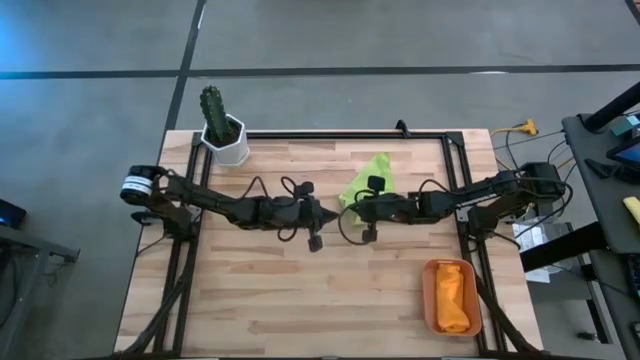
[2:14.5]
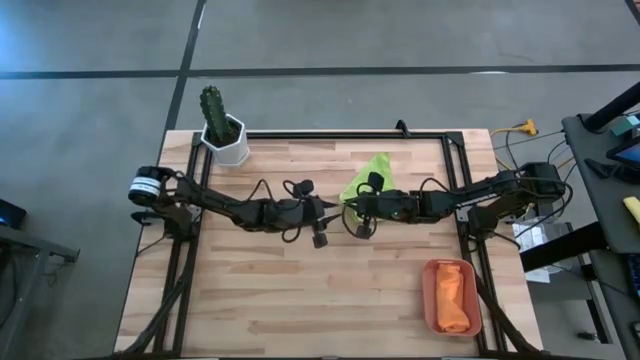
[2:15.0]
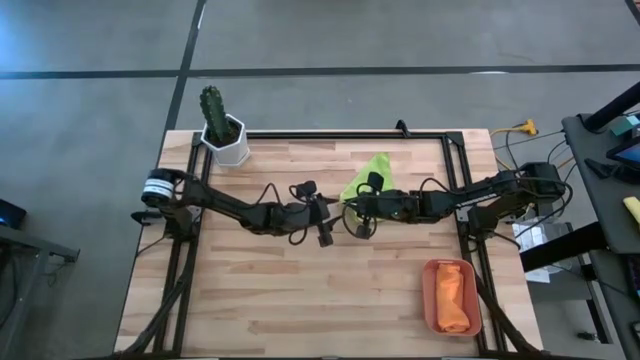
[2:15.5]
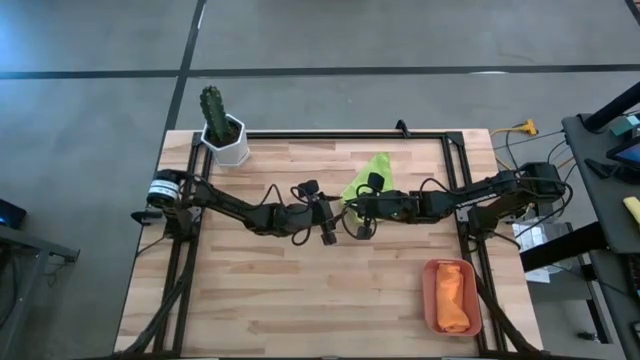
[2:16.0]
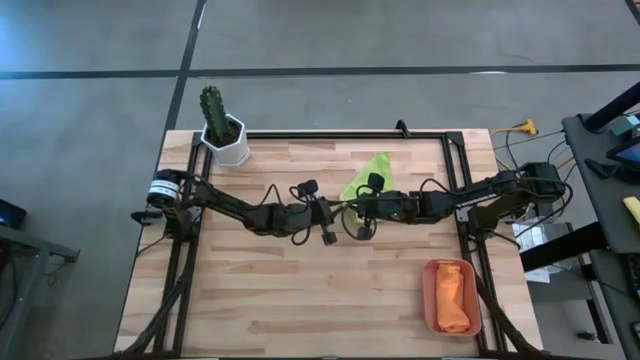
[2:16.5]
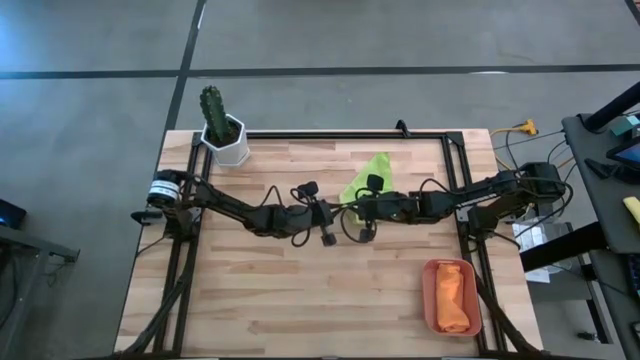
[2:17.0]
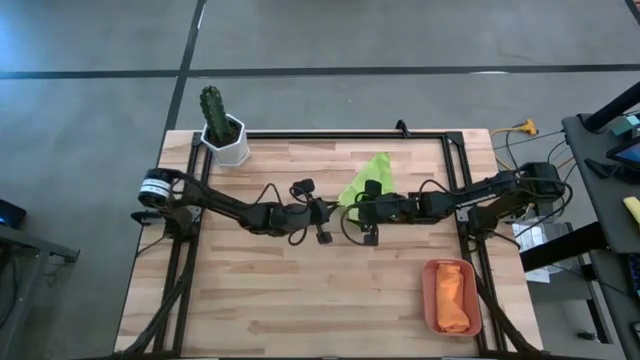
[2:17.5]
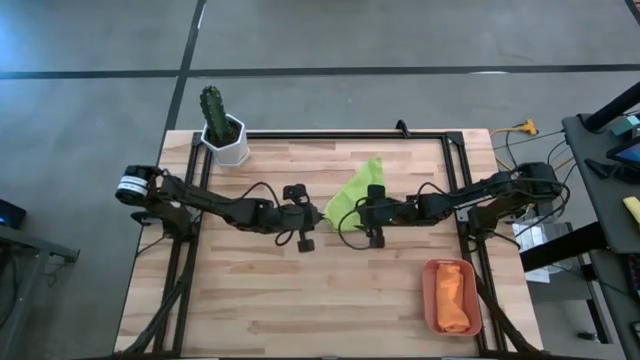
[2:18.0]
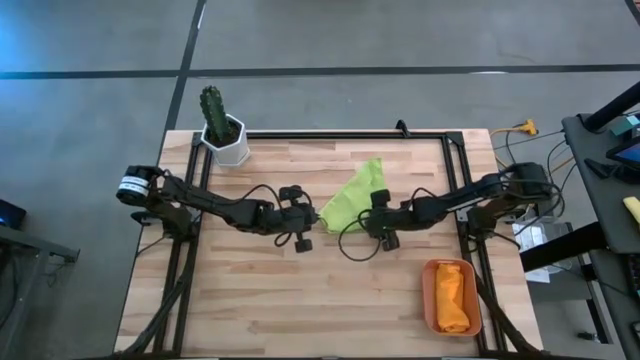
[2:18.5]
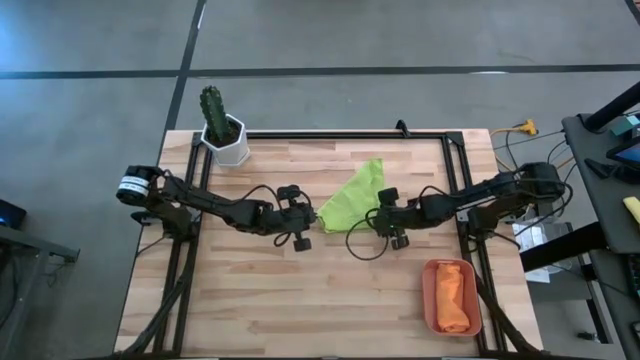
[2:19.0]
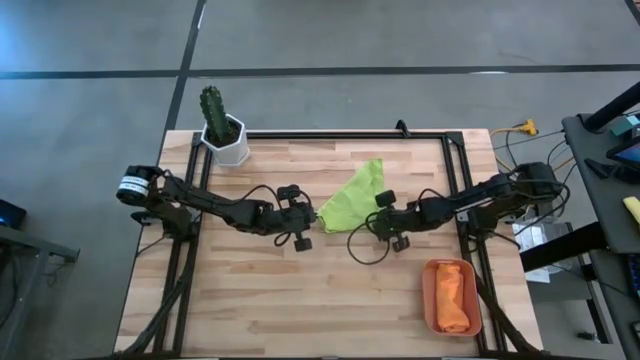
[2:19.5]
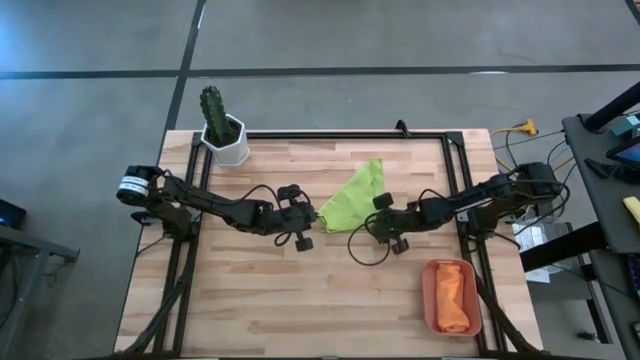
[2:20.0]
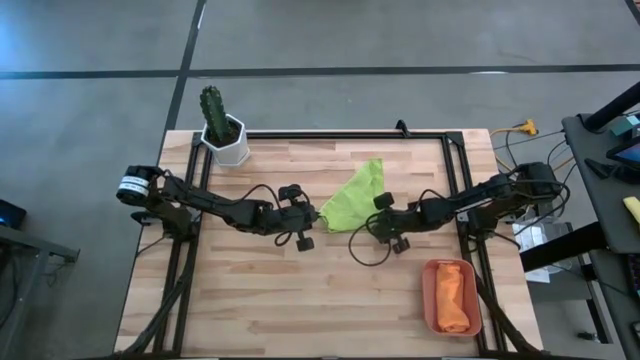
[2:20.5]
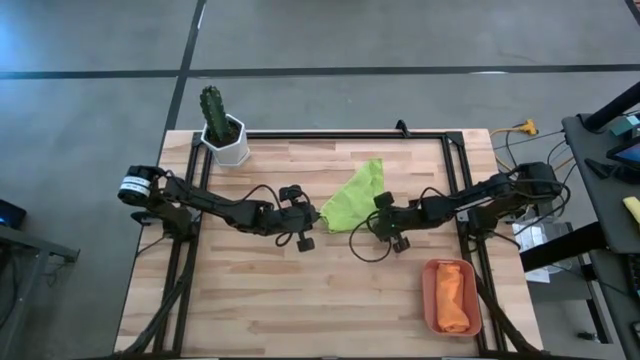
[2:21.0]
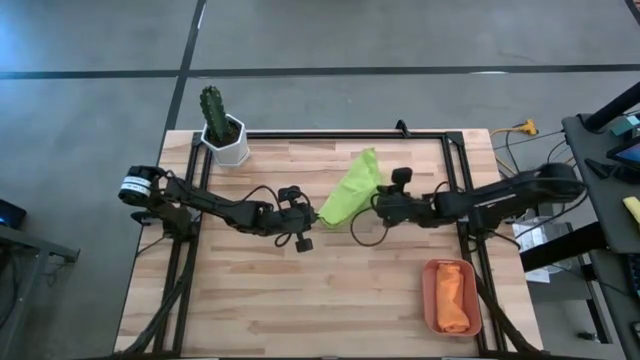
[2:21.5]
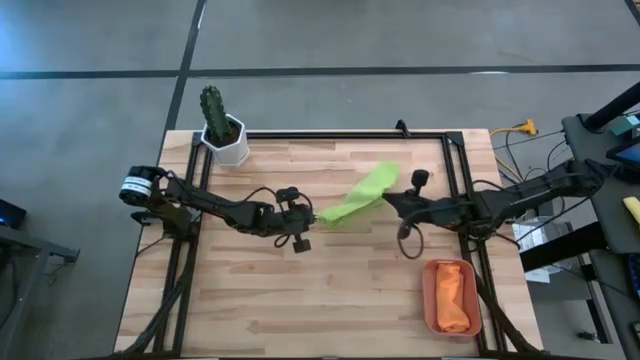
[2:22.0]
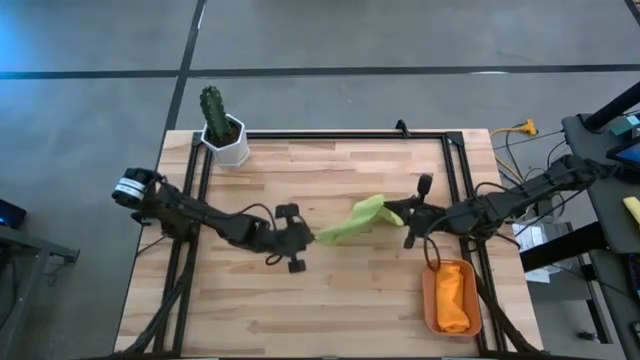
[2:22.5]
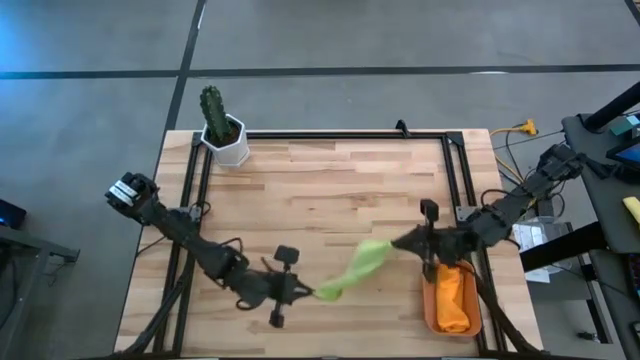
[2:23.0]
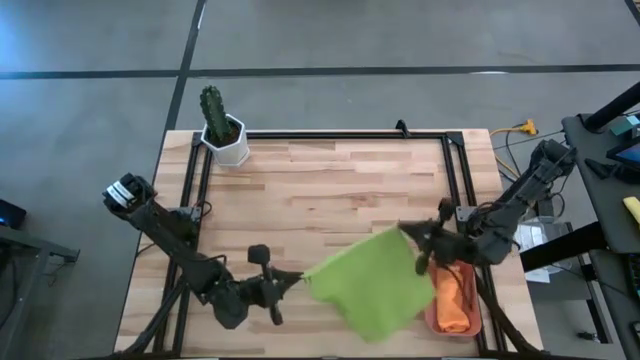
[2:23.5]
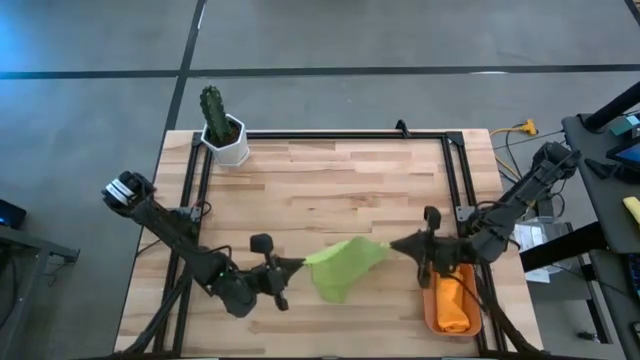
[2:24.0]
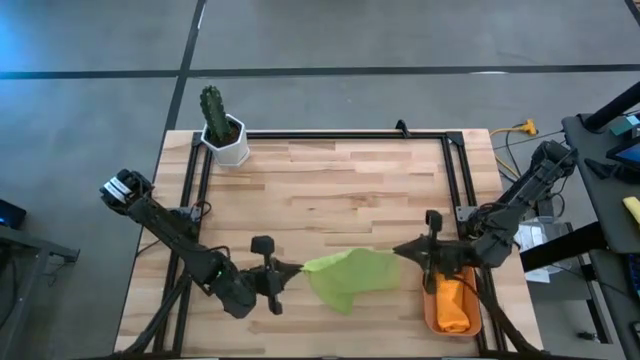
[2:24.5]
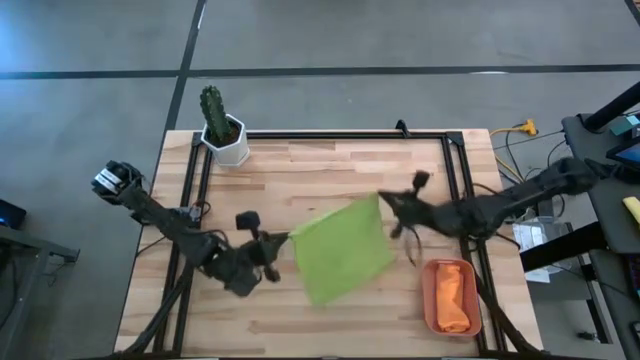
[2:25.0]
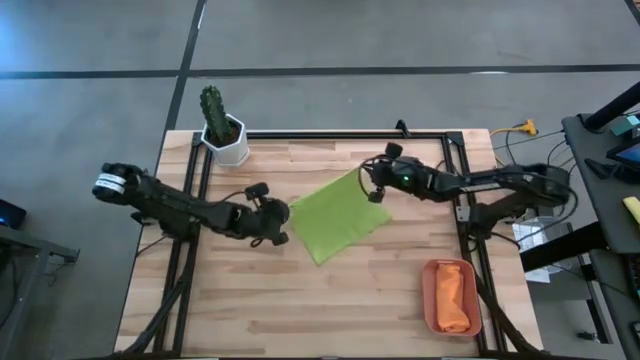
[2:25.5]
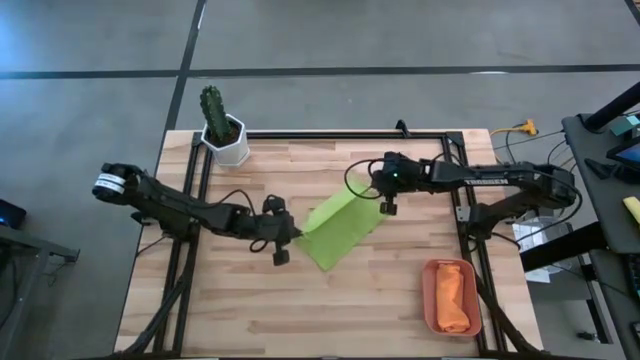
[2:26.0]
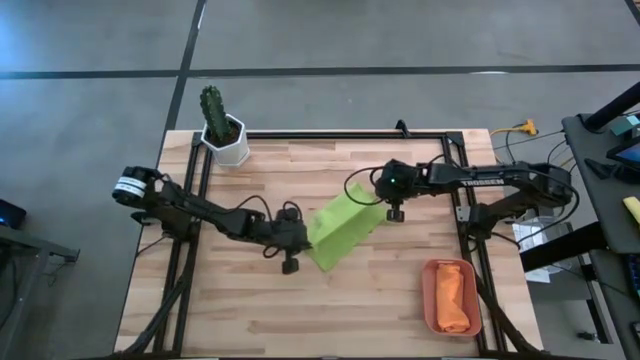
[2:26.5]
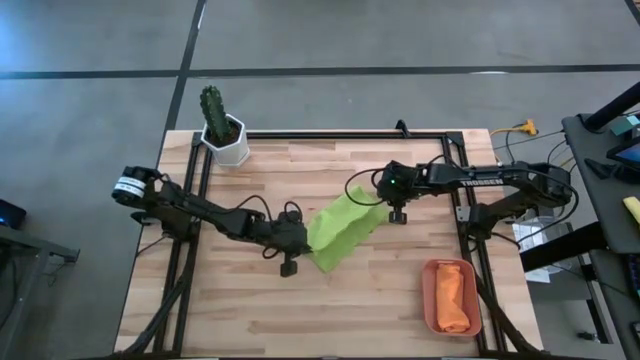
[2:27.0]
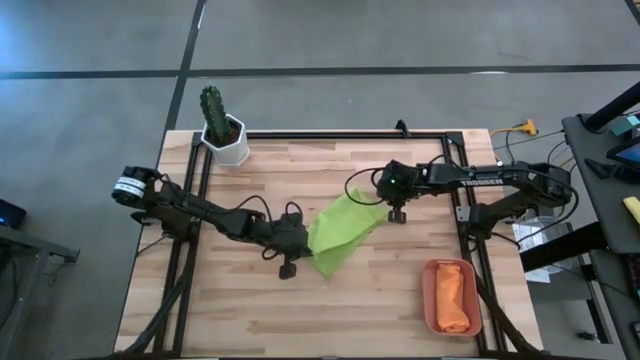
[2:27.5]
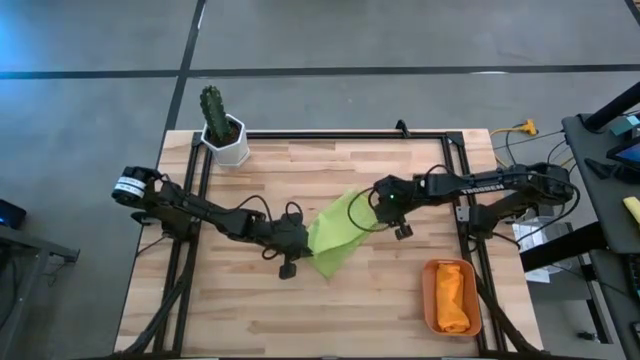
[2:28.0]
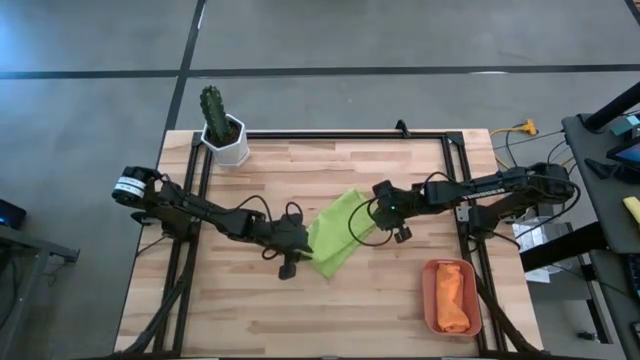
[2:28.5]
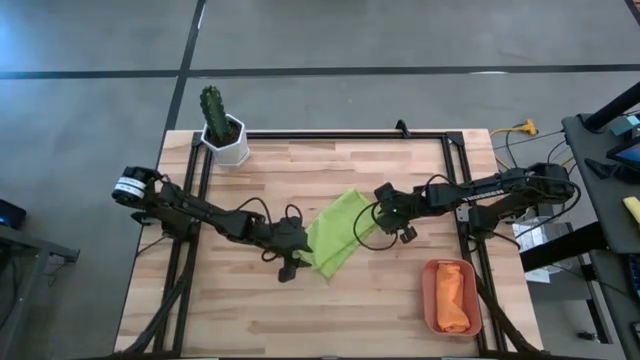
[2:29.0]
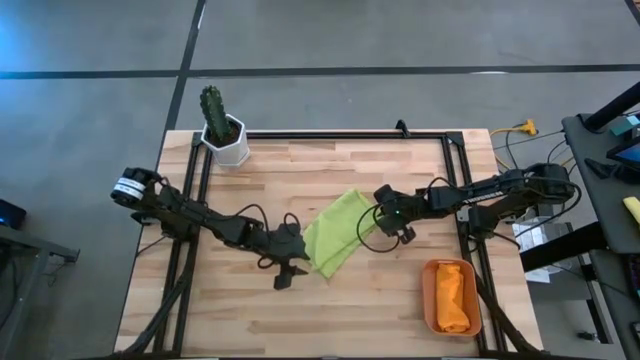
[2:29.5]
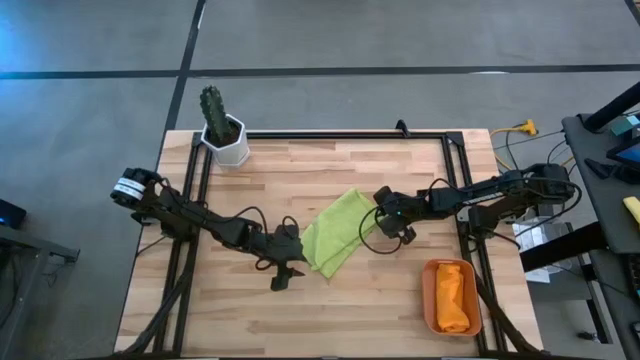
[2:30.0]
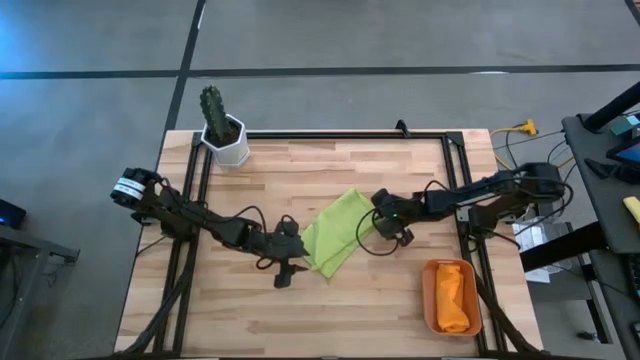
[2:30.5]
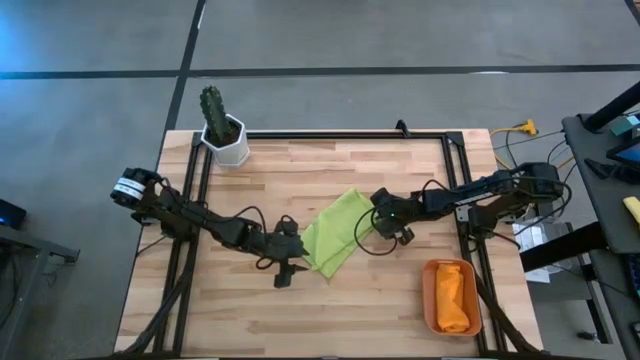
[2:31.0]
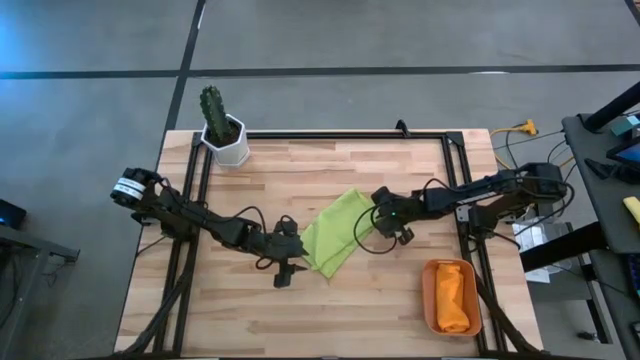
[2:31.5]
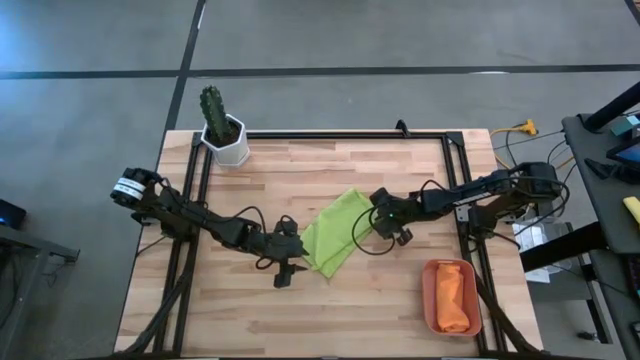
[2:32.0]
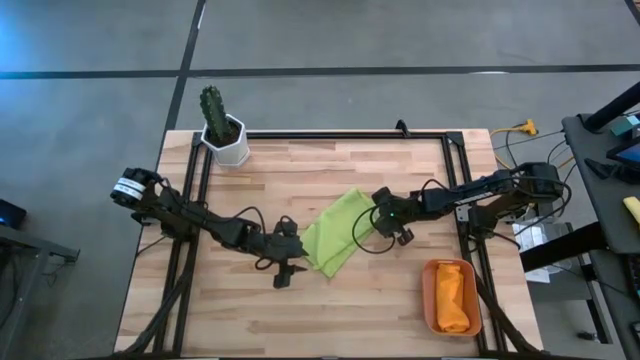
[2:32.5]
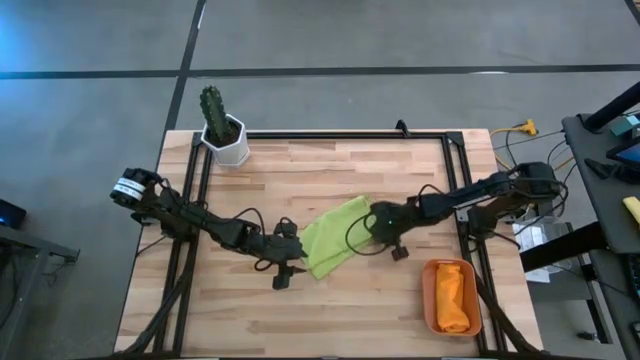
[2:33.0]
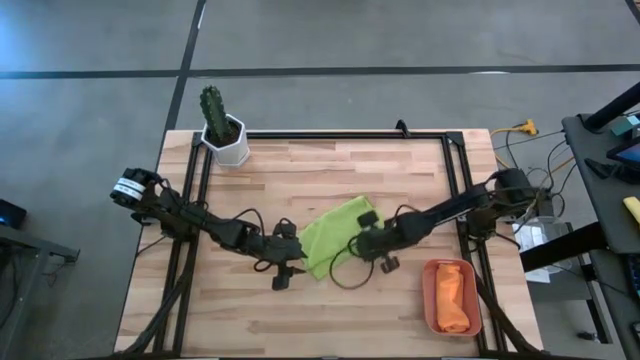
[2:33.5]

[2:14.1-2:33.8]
Task: Roll microfiber towels into tight, uniform cylinder then place into a basket
Fold the green microfiber cloth

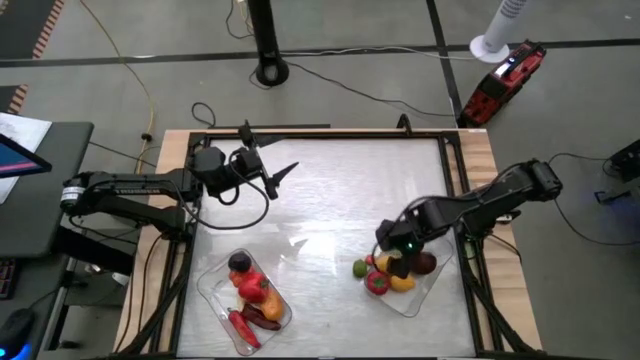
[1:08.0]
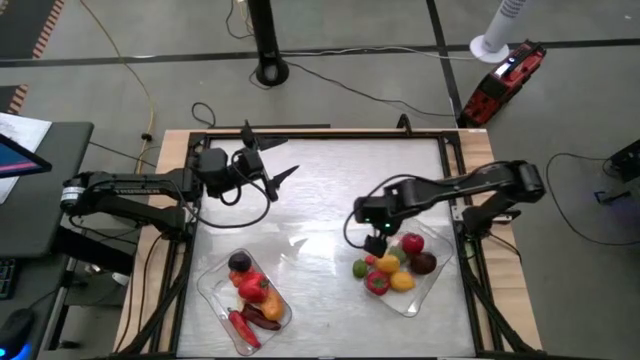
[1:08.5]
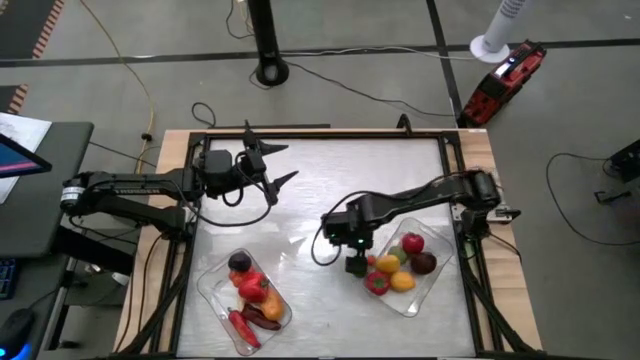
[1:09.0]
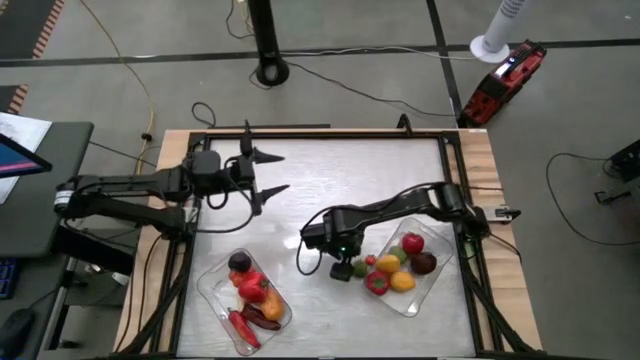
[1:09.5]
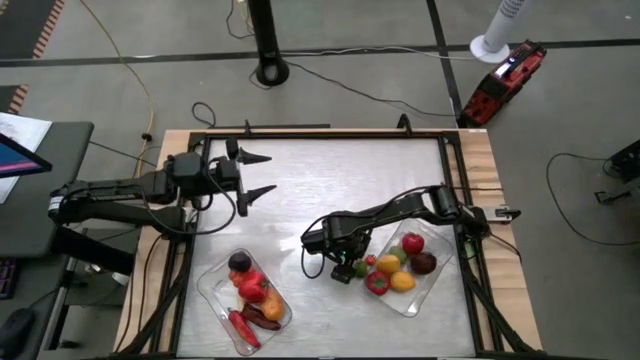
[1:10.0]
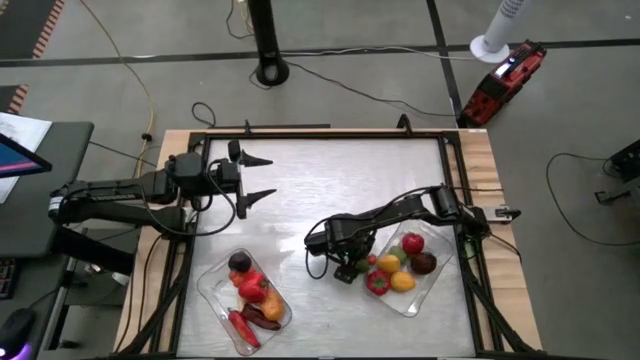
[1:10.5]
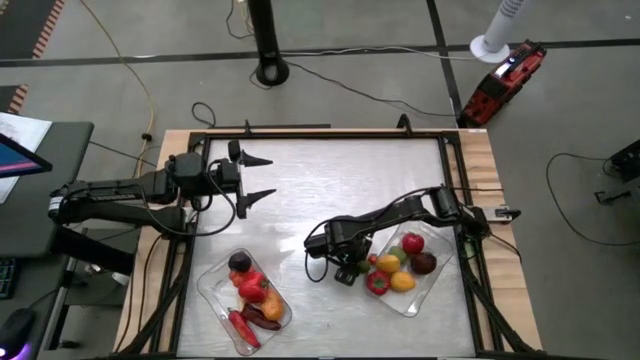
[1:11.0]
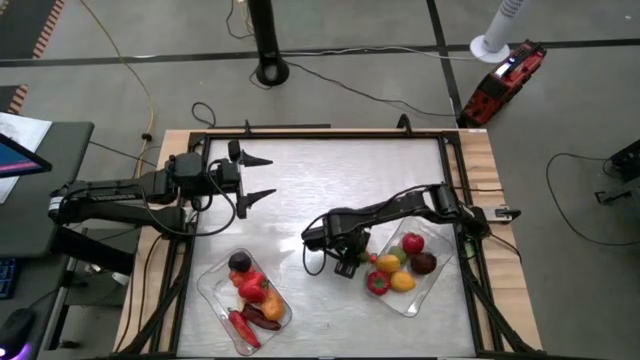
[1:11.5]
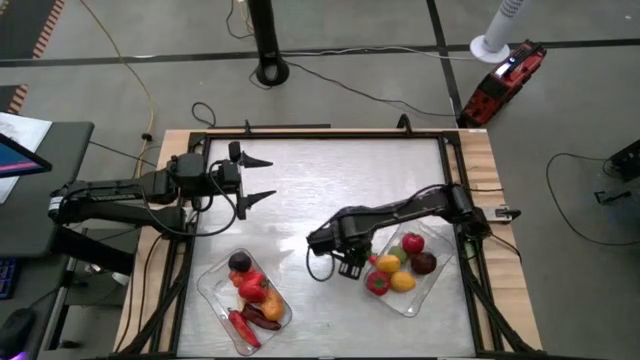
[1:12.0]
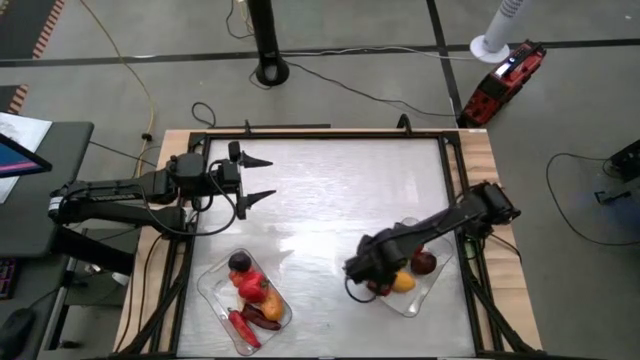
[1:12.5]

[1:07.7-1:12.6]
Task: Sort produce into baskets
Put the green lime into the right transparent bin
